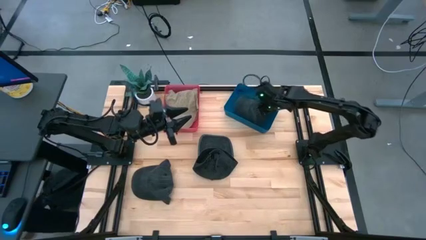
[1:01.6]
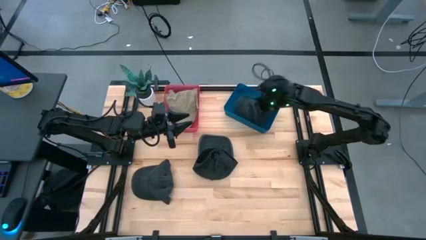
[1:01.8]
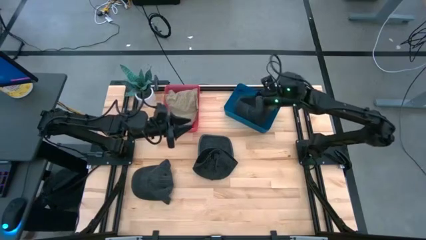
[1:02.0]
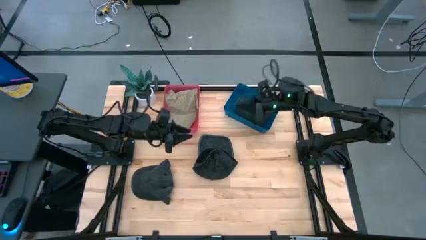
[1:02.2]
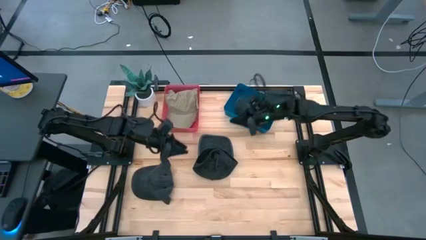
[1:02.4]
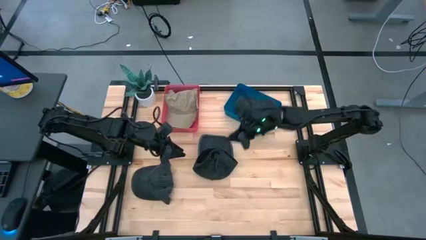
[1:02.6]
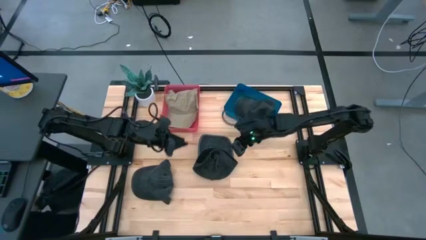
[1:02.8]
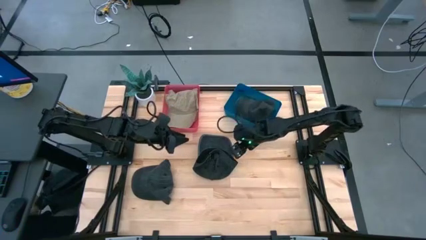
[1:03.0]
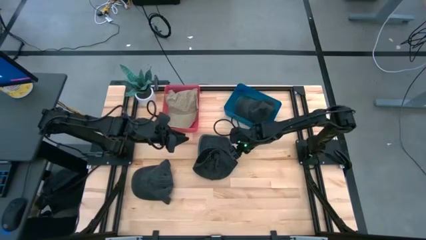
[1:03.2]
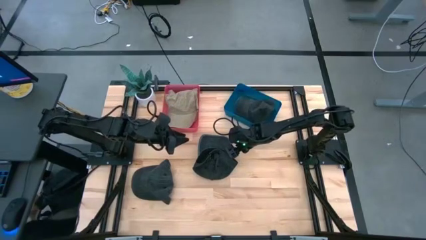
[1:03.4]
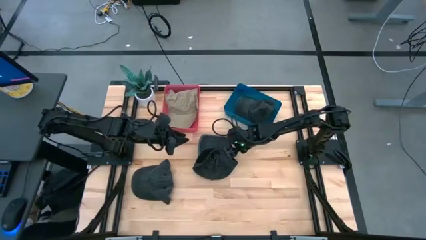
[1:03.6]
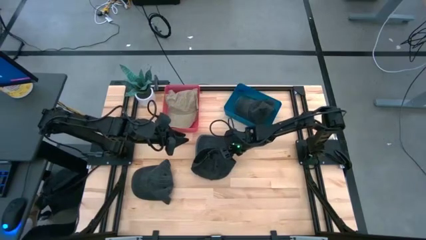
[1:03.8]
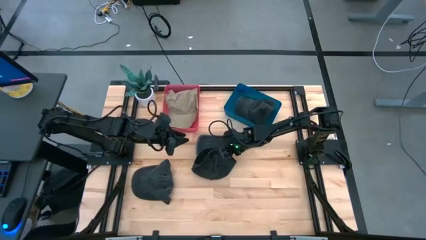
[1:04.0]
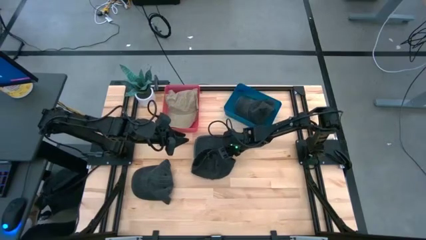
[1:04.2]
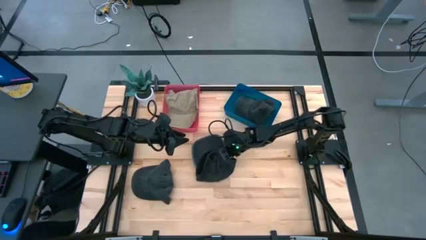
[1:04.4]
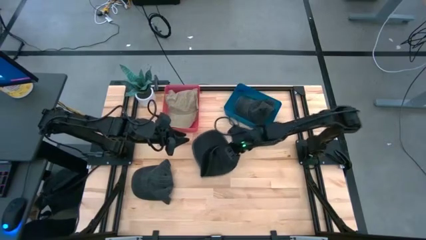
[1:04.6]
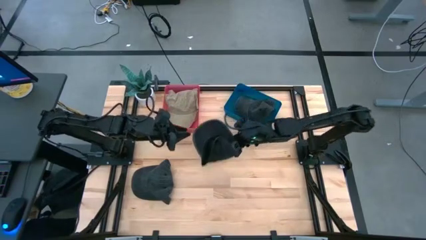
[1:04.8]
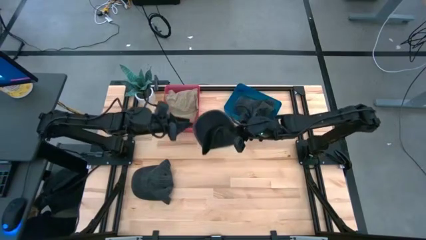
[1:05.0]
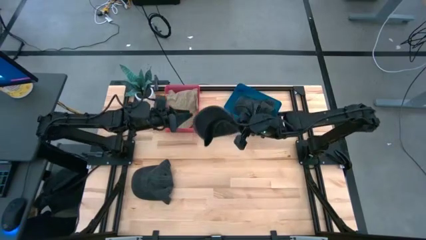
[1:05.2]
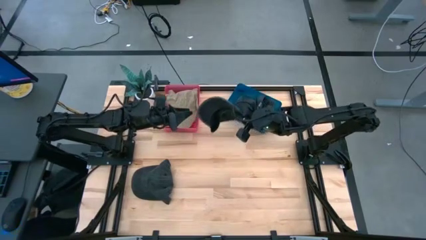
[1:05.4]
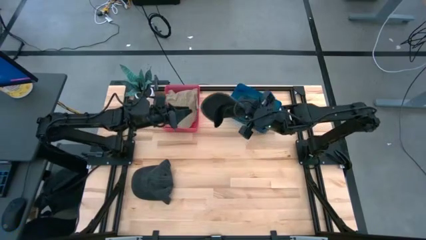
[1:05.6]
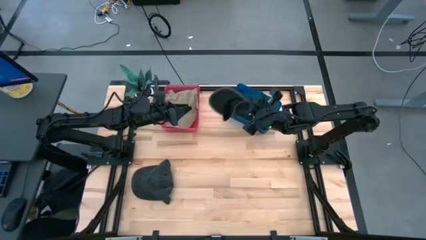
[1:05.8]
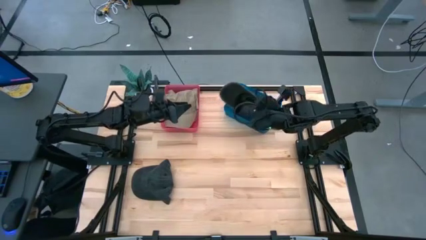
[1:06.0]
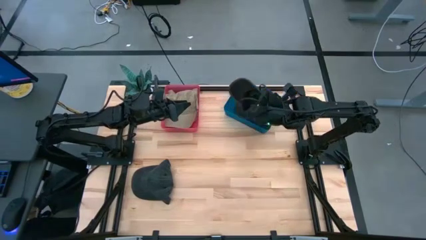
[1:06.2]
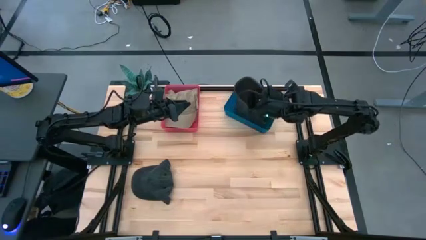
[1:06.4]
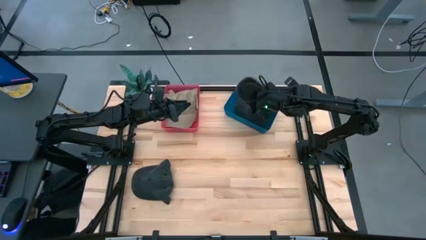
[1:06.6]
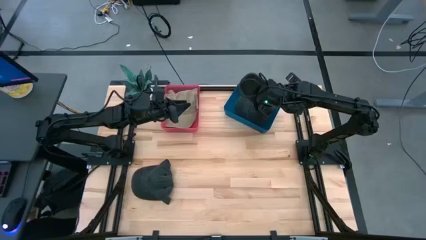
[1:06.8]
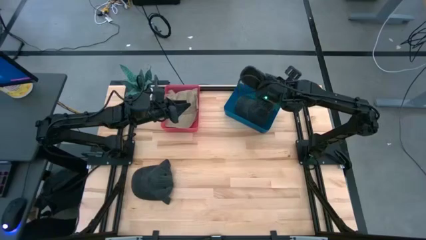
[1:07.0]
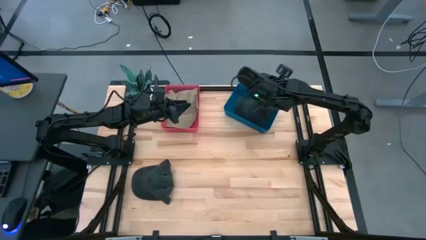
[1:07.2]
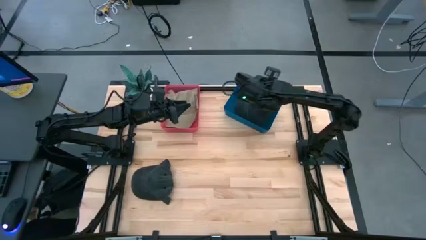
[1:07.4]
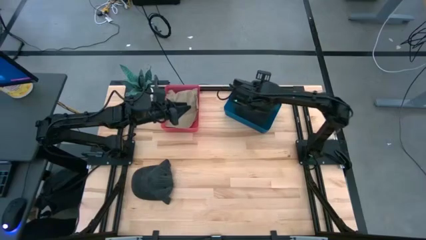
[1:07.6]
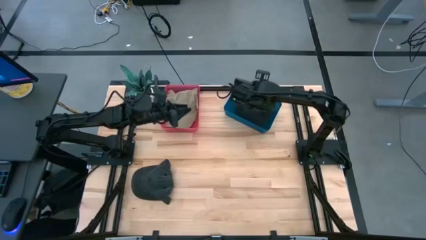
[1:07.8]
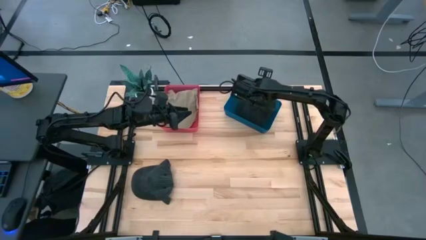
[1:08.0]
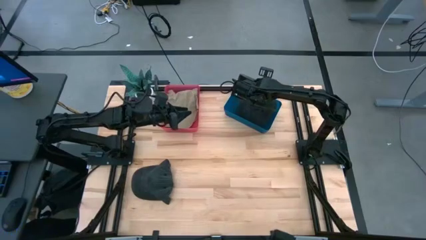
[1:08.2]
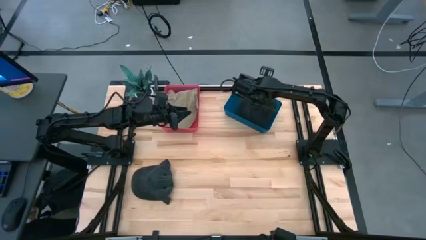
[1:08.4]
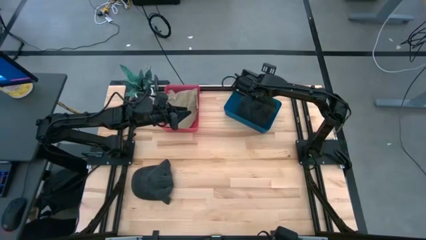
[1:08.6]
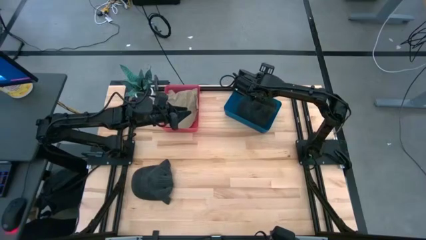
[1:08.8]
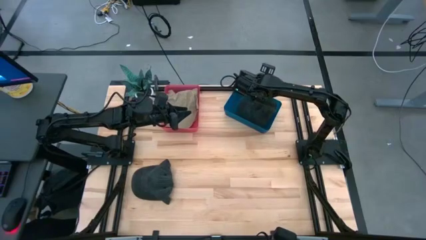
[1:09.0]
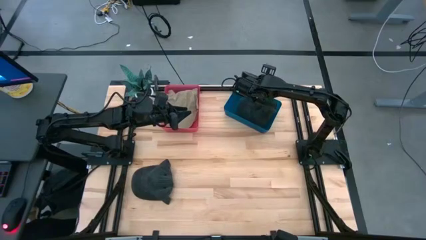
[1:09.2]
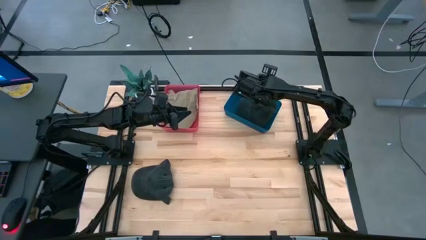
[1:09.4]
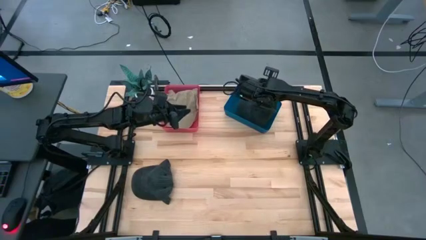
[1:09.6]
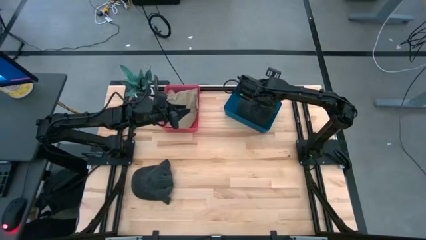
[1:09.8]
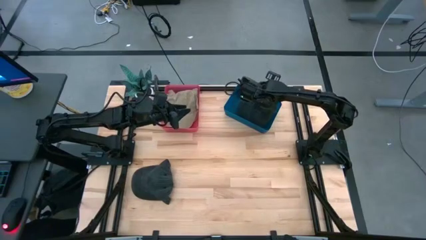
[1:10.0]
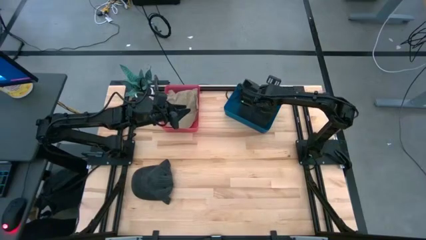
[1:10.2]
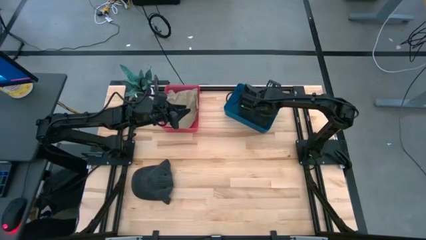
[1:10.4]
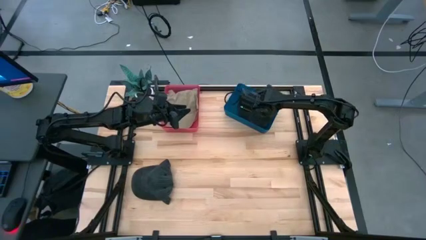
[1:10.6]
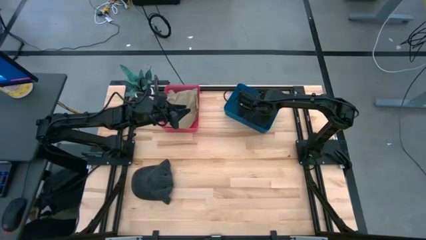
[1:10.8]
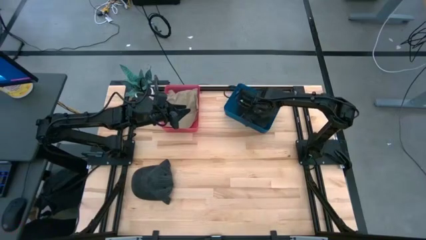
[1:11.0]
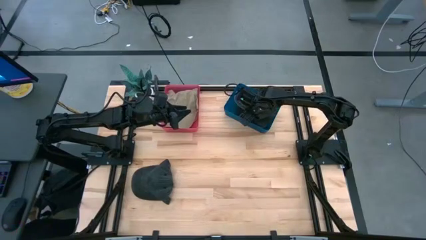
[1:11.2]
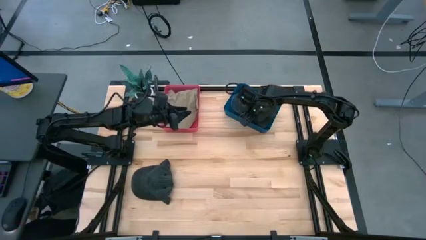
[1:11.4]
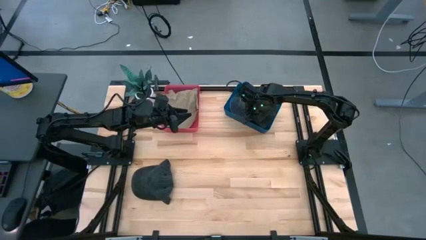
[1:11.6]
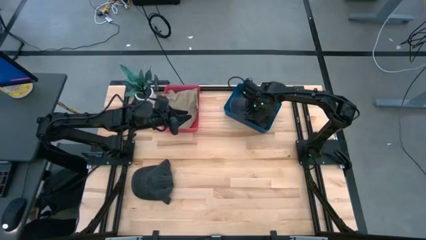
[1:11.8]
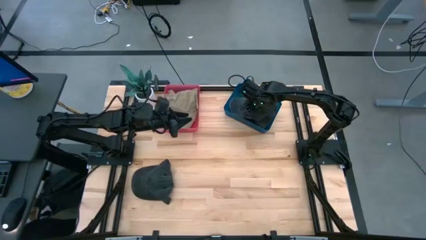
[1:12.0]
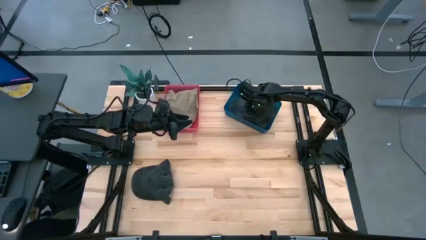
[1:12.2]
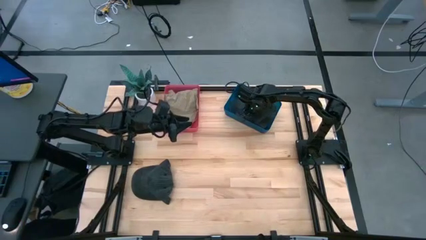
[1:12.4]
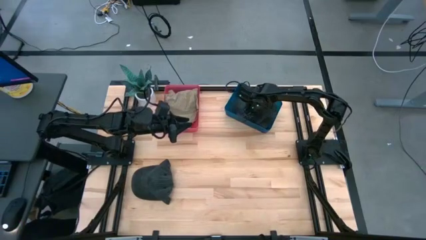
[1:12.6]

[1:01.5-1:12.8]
Task: Pick & Place hat
Put the top black cap into the blue bin

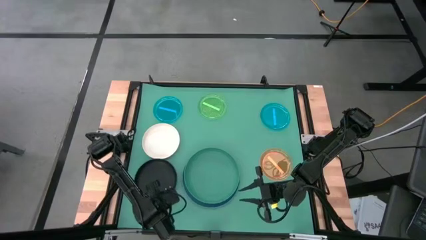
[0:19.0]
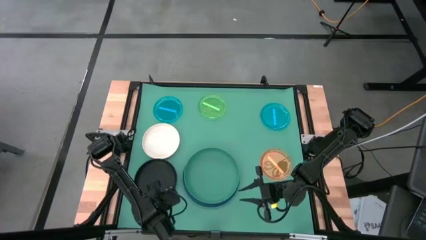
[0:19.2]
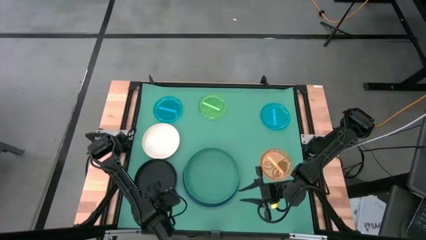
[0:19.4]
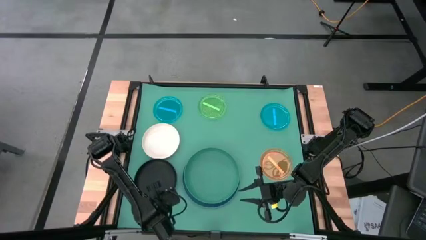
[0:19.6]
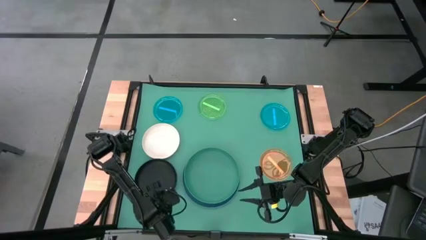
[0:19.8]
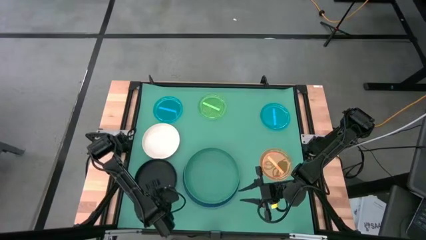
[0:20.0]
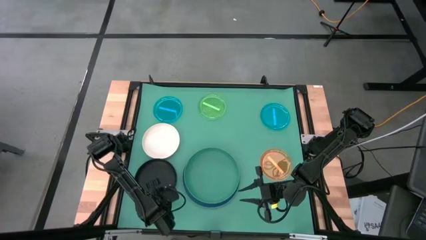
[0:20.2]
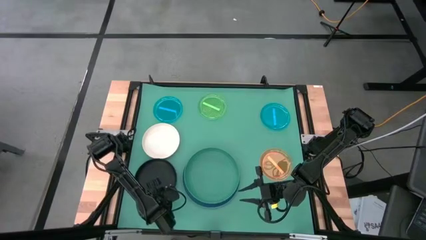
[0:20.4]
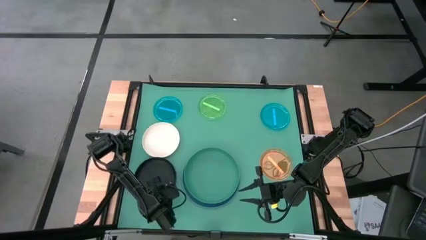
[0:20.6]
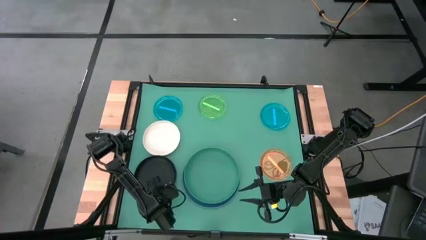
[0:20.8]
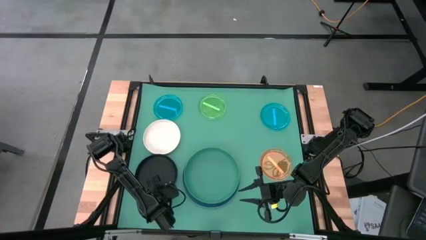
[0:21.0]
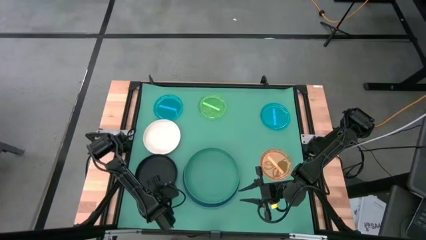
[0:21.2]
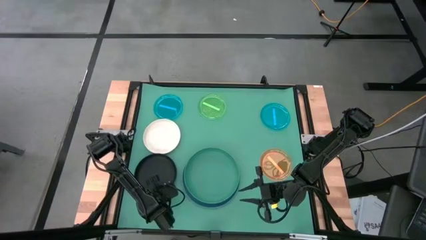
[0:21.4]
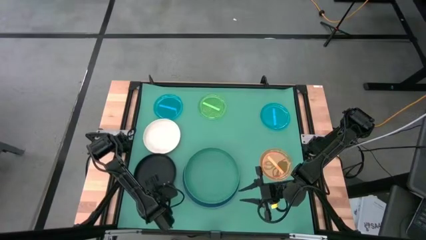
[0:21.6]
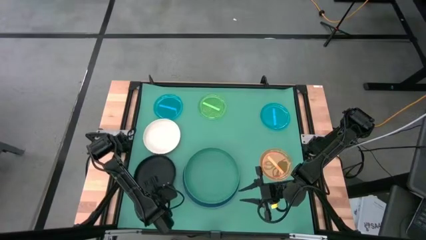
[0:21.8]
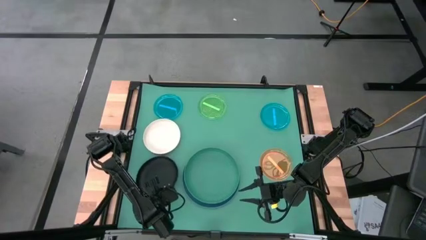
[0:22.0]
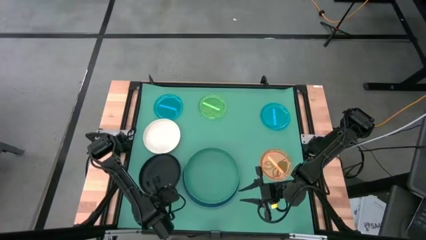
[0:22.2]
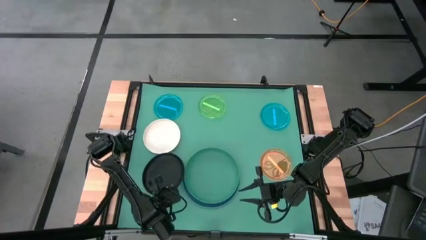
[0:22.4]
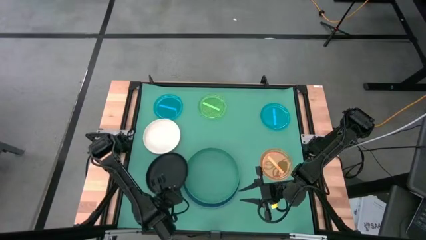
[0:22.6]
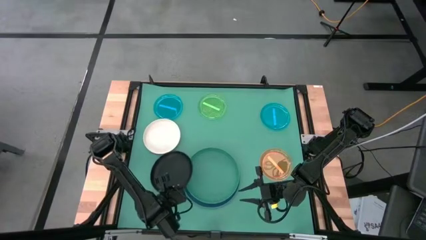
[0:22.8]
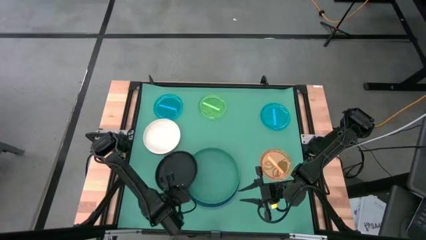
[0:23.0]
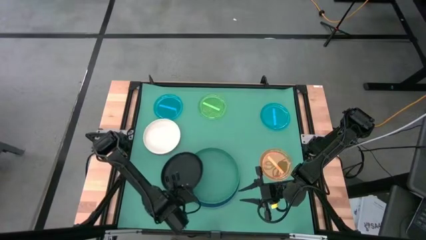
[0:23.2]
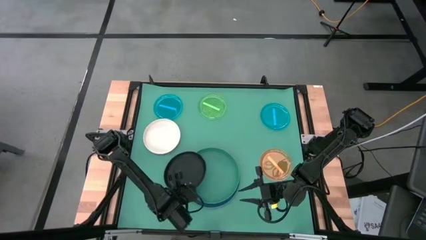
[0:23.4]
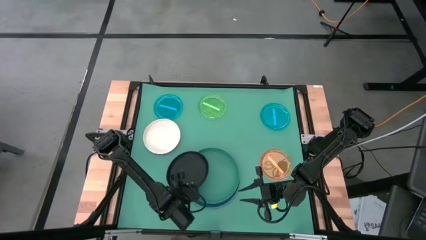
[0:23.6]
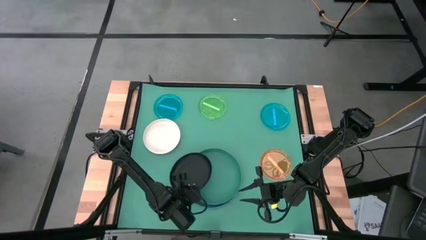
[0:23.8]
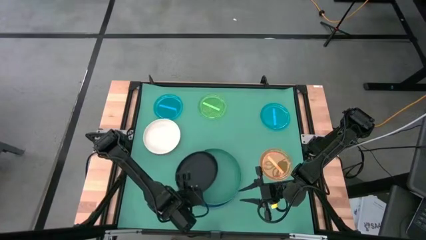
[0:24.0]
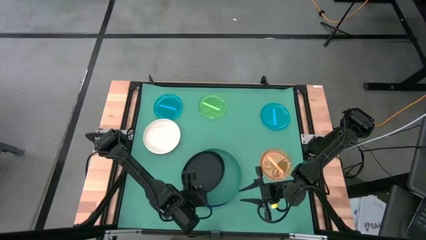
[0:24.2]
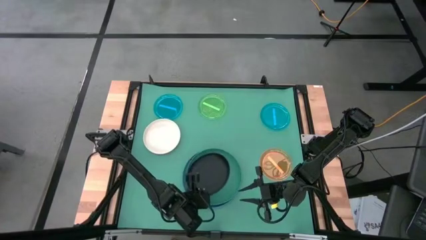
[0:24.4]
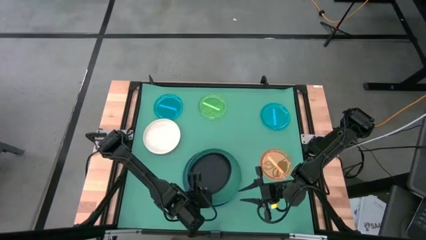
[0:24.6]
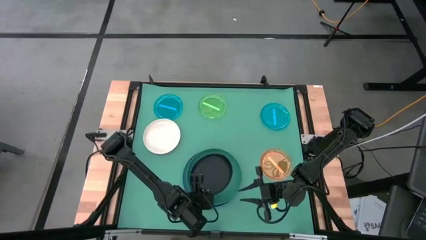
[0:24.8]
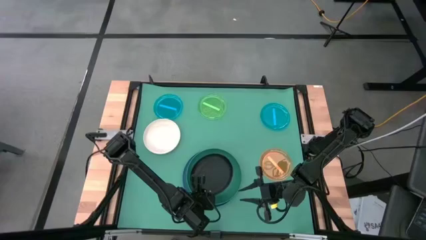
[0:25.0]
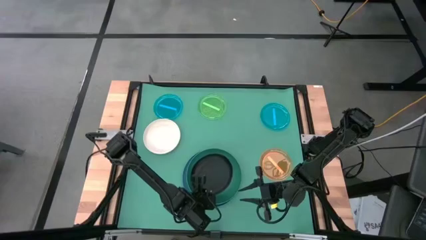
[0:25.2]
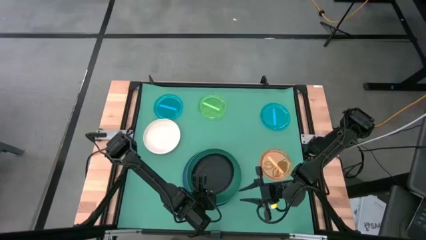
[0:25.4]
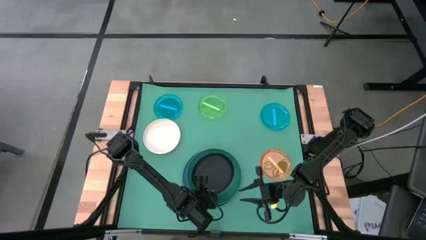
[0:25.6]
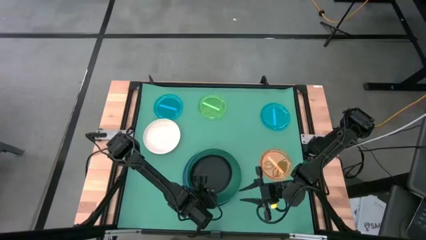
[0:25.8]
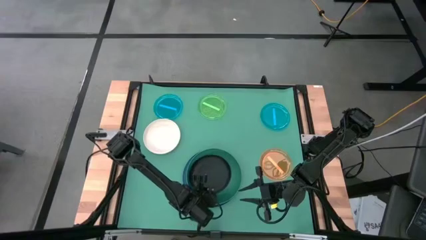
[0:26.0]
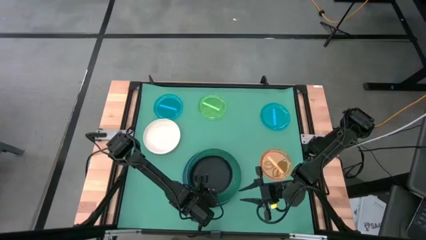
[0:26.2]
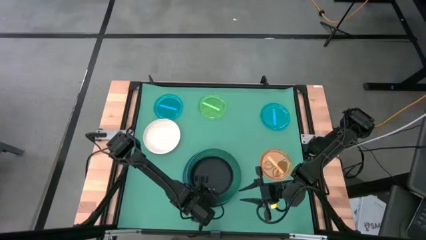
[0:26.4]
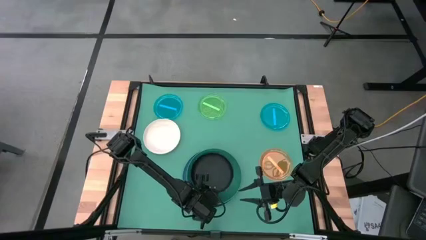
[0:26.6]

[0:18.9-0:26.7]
Task: Stack plastic plates
Stack the black plate on top of the green plate
